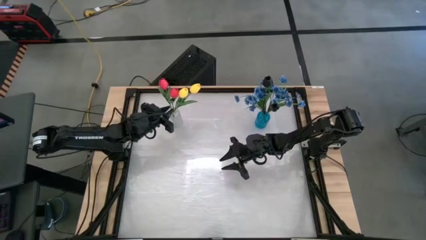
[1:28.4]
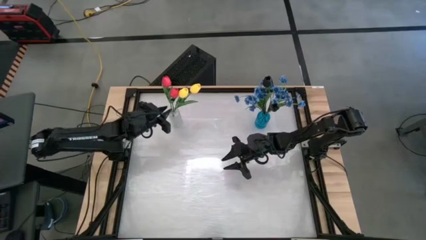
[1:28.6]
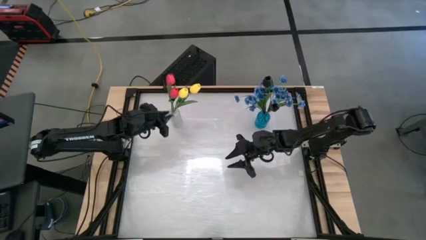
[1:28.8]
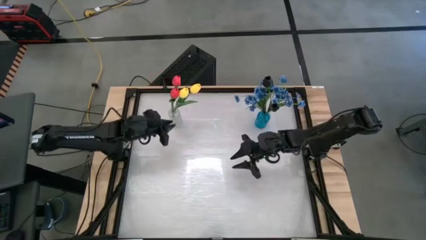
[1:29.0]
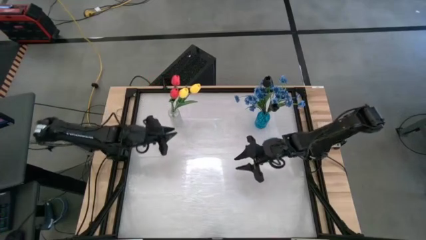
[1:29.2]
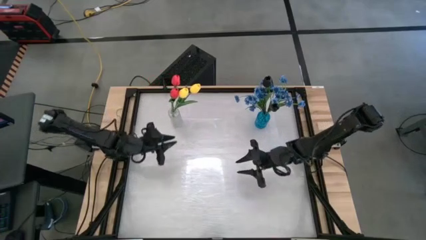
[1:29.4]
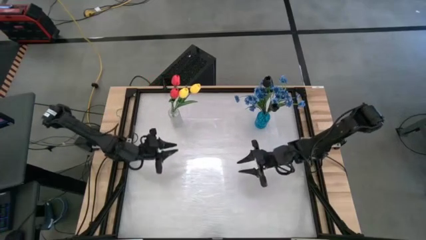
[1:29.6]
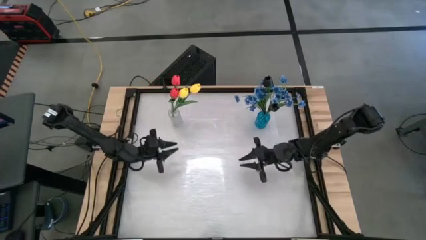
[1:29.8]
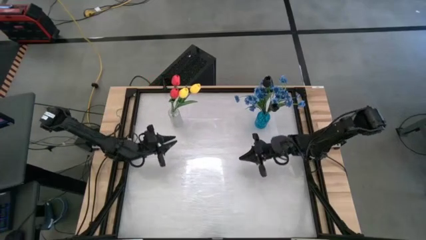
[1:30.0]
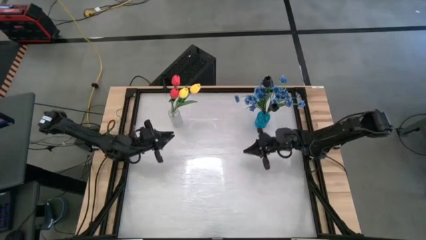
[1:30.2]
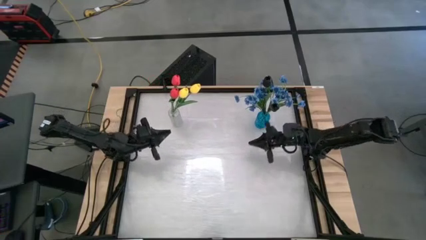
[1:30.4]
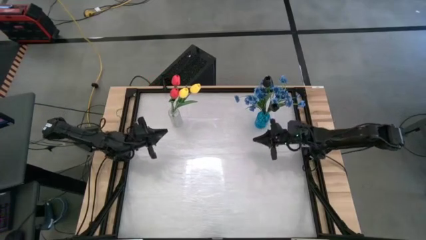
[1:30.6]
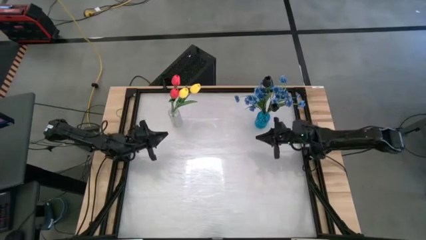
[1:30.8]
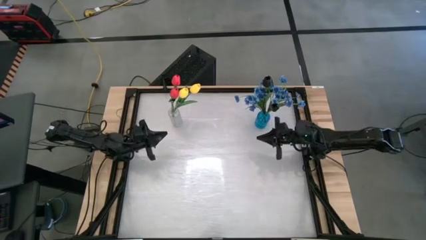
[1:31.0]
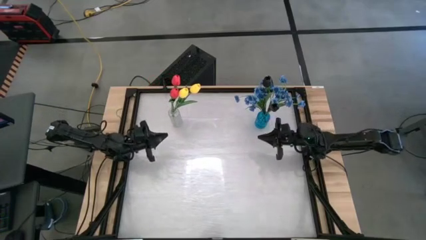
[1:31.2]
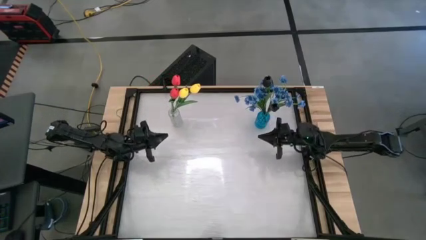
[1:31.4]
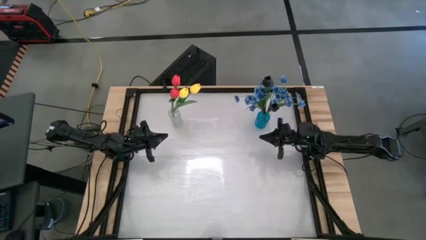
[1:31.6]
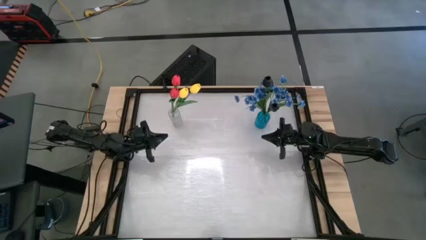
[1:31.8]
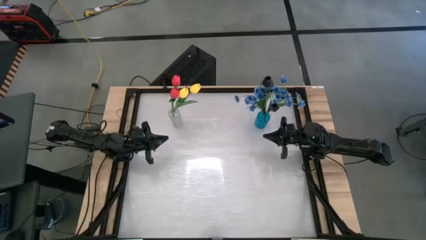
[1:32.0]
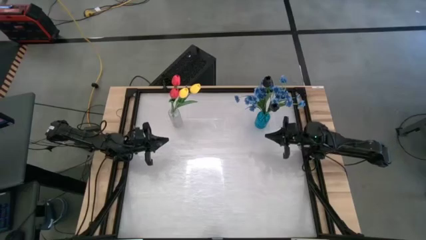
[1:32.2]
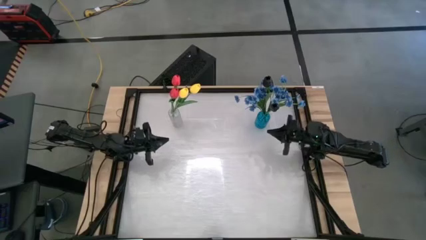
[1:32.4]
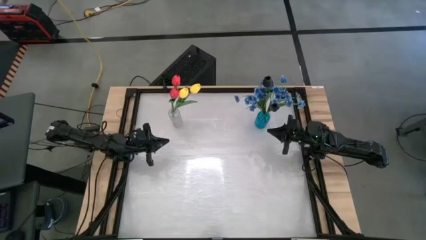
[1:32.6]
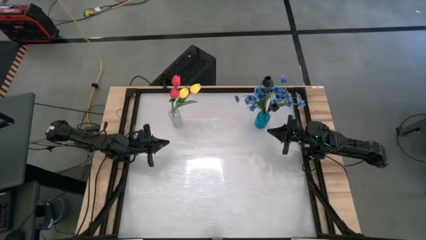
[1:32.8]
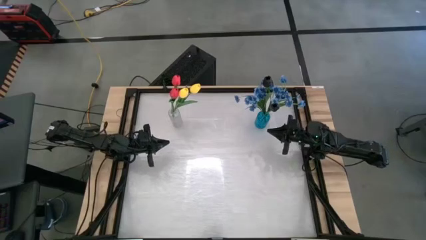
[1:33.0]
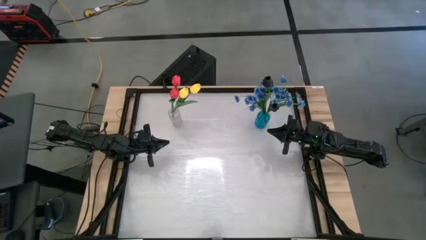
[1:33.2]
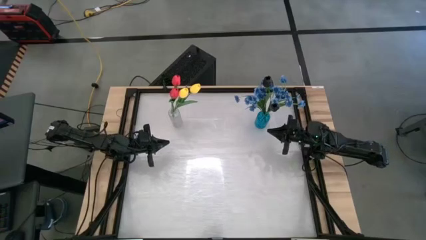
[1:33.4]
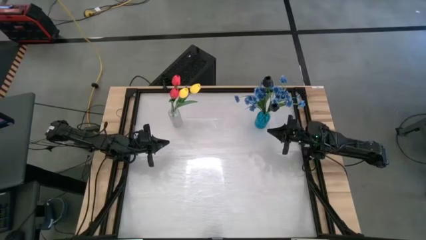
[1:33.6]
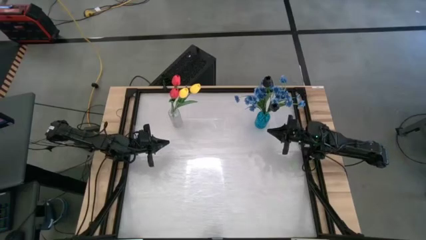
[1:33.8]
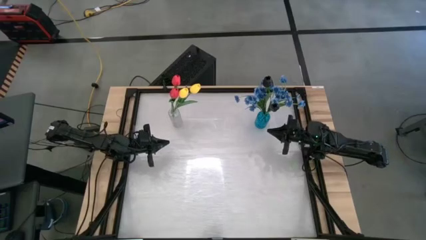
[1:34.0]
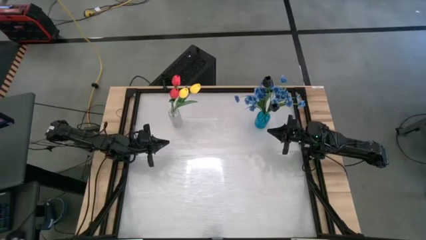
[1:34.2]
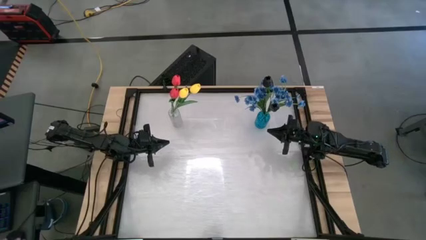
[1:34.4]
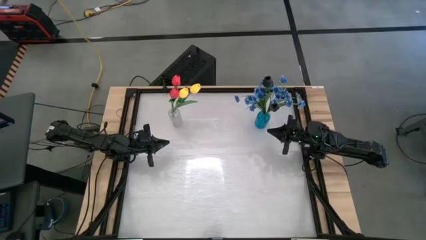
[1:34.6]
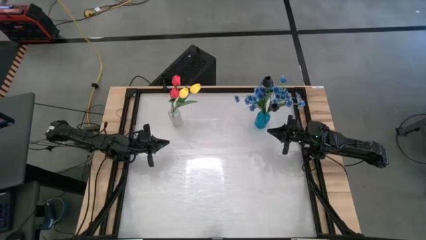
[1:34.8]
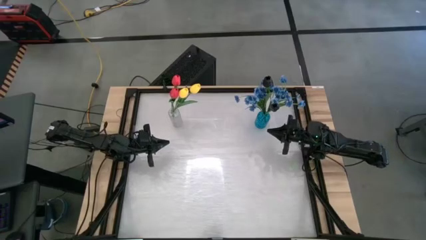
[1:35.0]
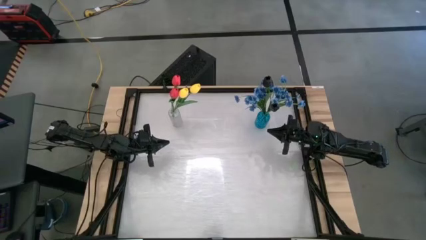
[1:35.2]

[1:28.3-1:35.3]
Task: Sort flowers into vase by color
Return to Home Position

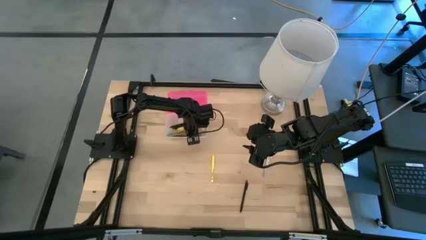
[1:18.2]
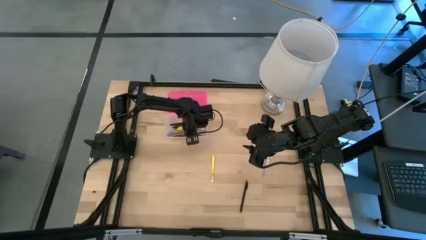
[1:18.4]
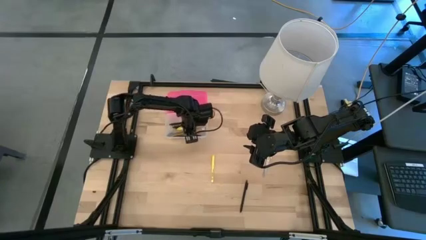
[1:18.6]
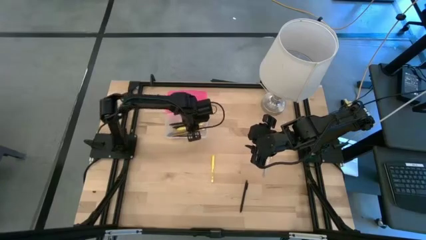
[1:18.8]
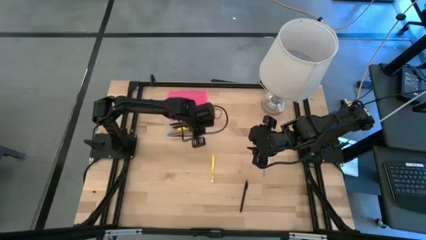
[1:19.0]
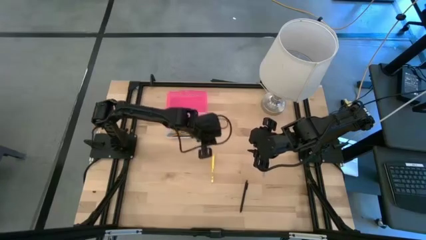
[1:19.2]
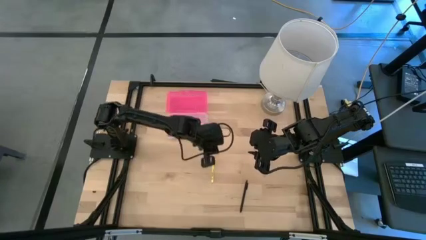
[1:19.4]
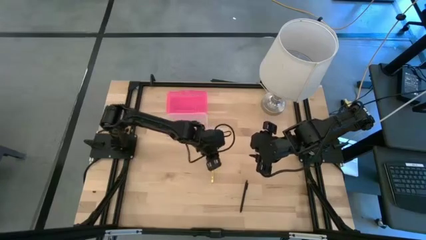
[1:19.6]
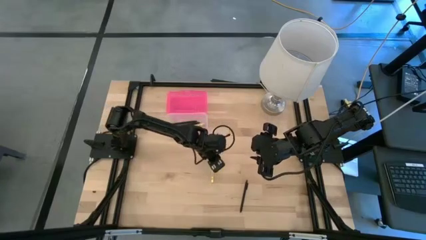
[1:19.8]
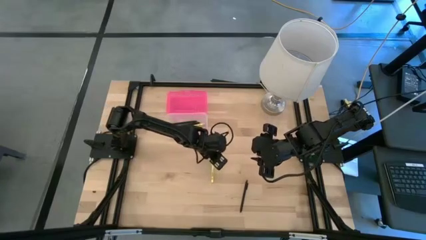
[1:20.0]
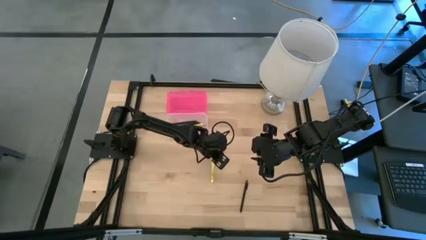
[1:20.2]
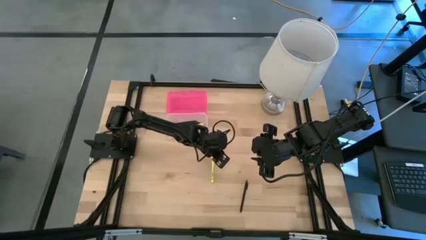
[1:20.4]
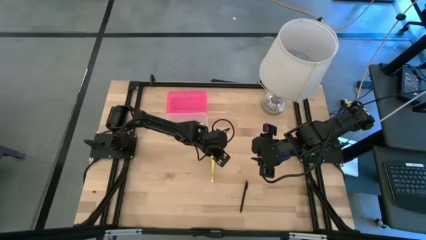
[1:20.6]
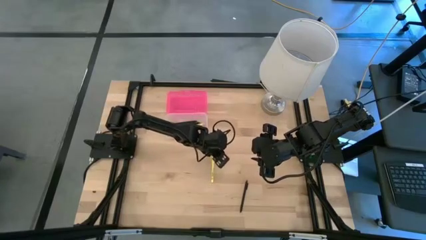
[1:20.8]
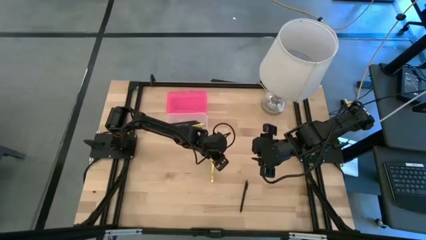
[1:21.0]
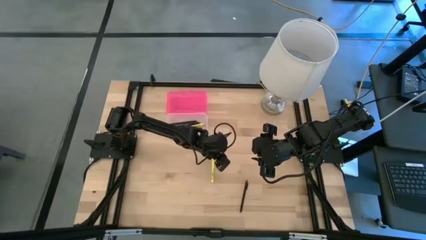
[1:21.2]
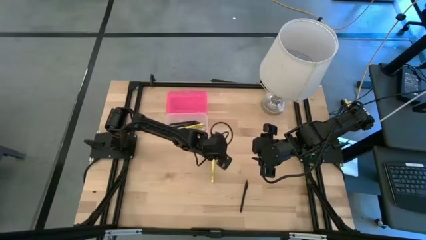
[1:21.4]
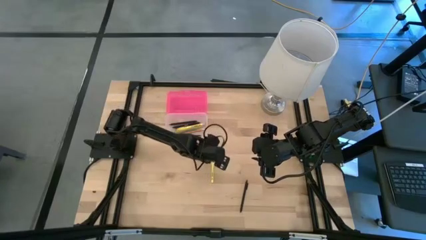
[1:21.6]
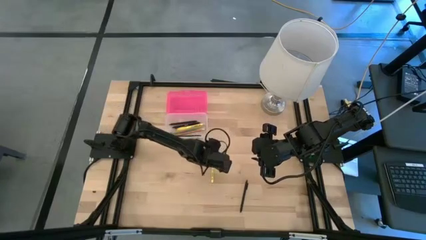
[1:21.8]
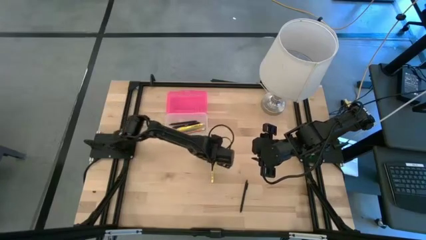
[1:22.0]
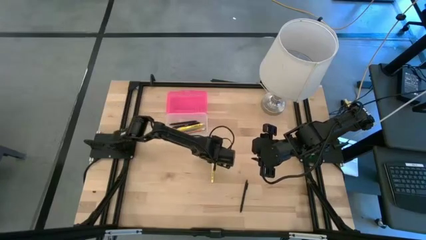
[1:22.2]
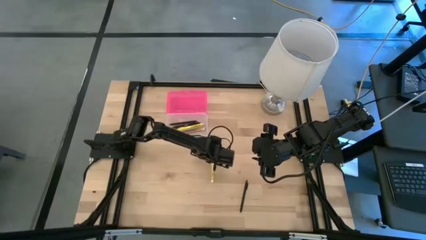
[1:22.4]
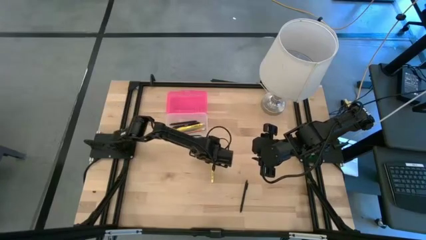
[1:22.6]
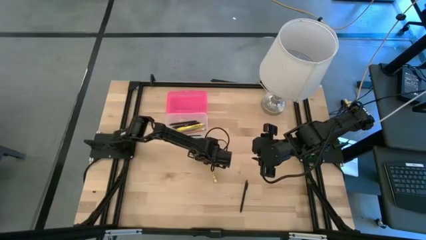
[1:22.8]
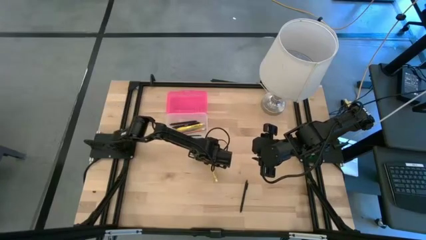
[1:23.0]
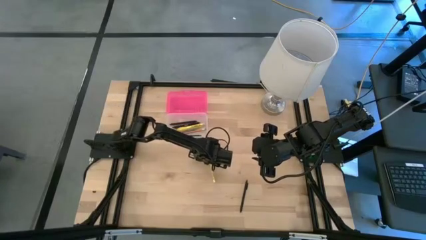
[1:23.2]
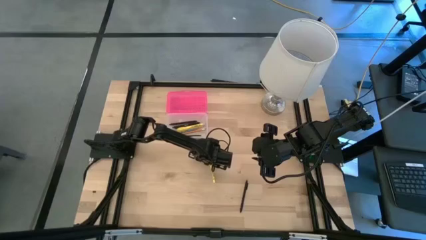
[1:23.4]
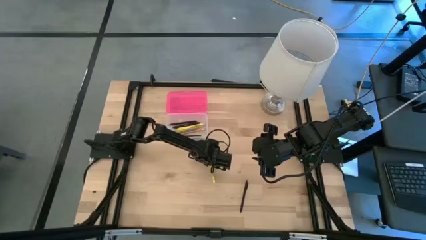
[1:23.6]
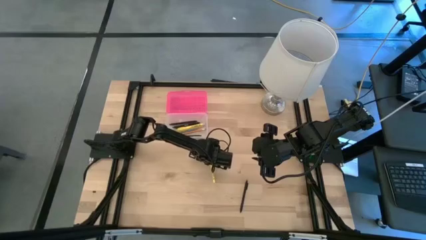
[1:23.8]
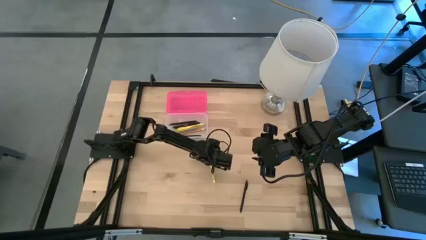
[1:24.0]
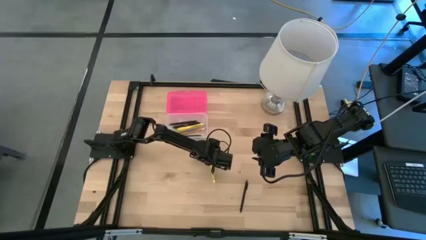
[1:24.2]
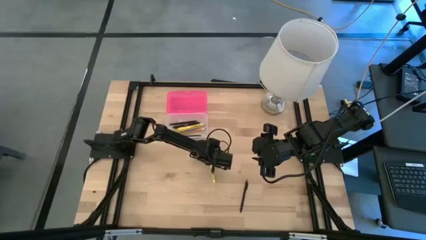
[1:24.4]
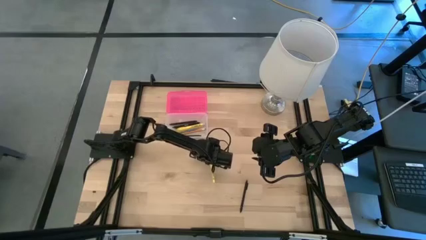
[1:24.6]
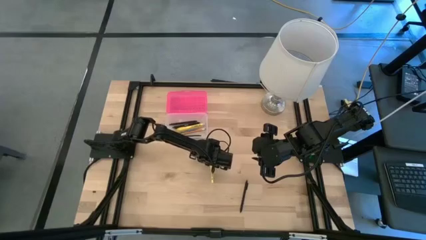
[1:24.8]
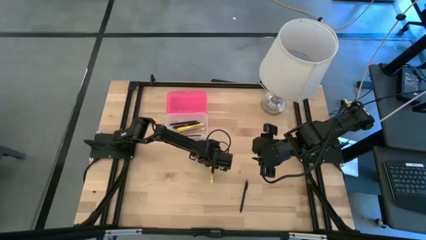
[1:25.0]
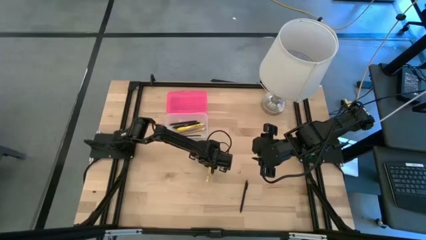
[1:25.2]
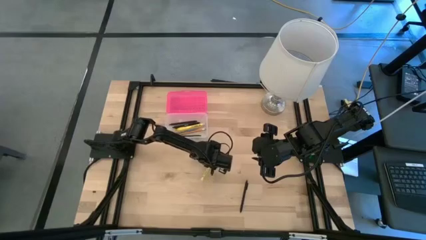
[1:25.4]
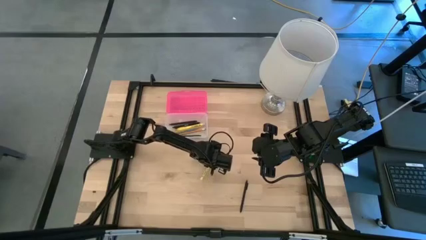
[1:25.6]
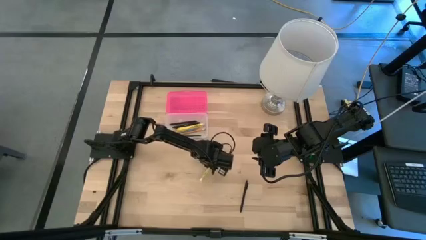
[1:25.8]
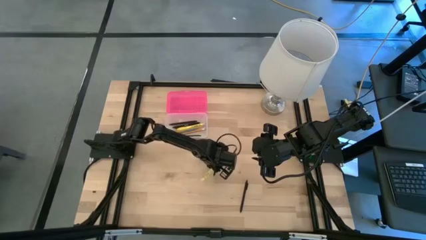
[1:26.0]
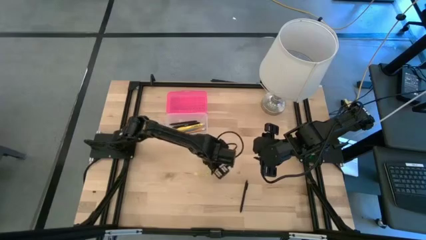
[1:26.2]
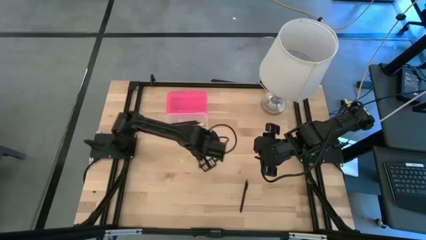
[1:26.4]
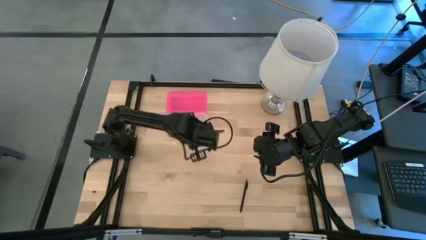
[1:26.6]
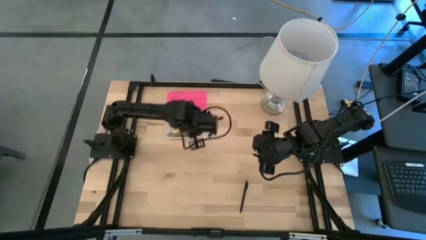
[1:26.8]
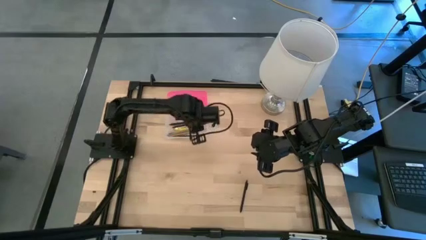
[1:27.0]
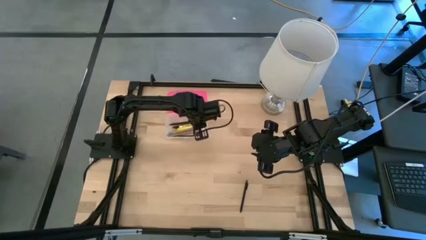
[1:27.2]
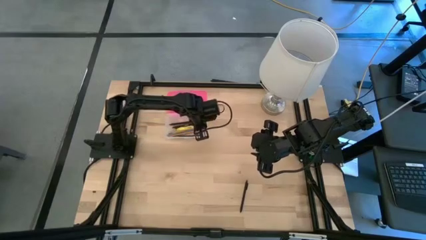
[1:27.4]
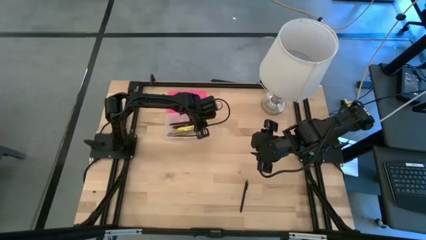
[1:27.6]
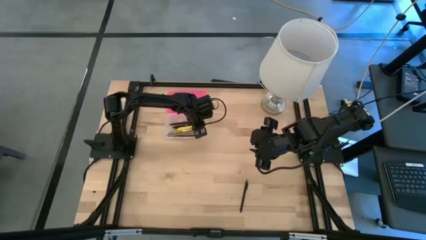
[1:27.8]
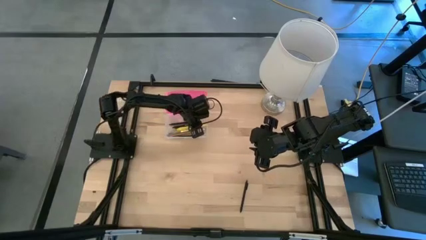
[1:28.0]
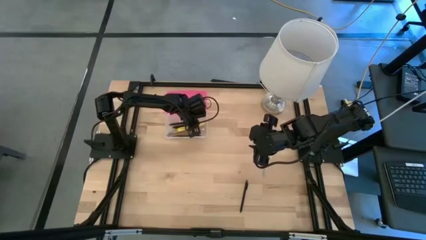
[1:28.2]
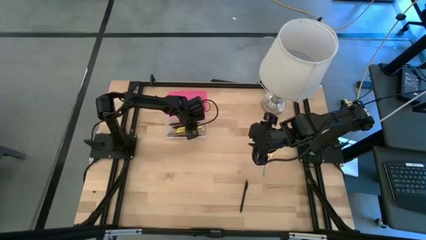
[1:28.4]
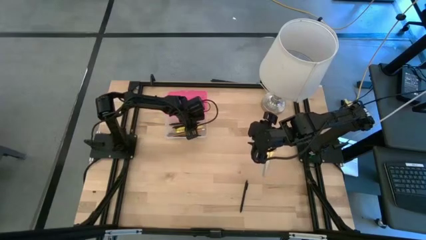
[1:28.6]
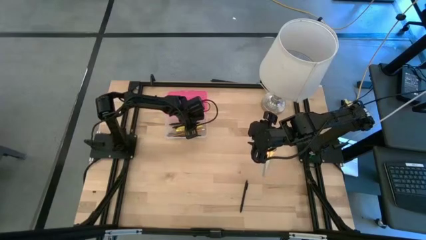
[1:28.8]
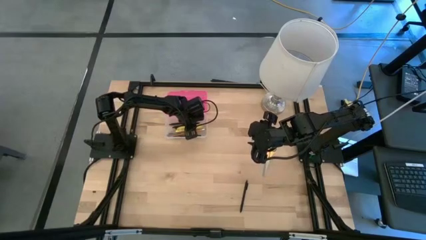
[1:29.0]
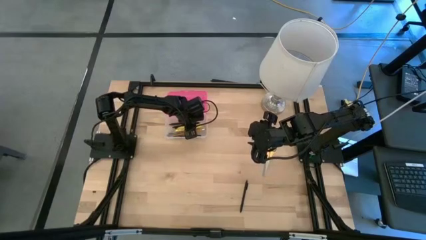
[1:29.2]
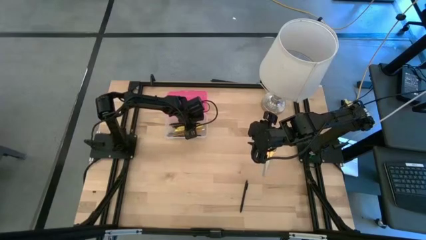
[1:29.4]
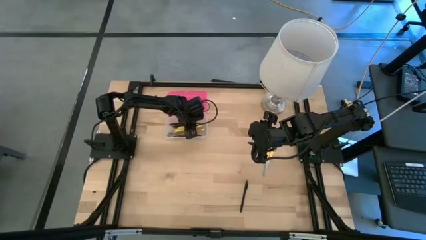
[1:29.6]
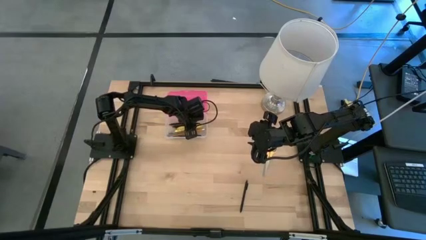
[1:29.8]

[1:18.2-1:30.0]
Task: Pick & place school supplies into a supply box
Put the yellow pen into the pink supply box
